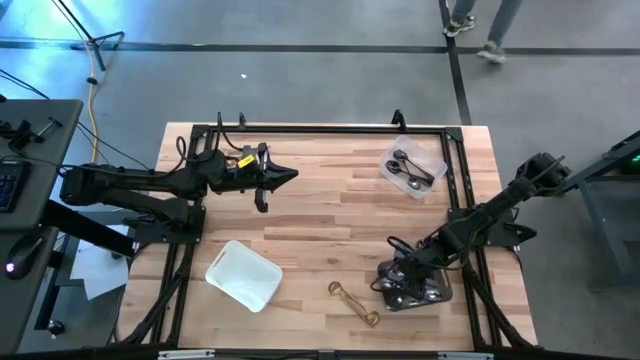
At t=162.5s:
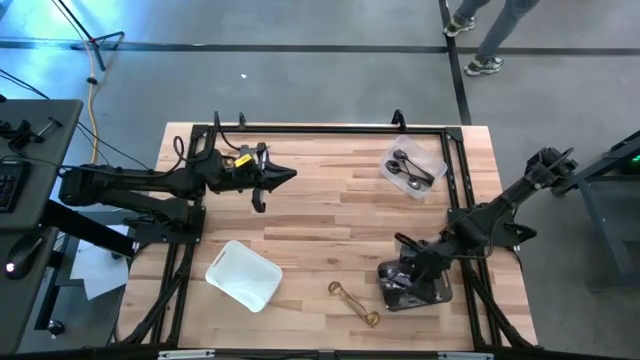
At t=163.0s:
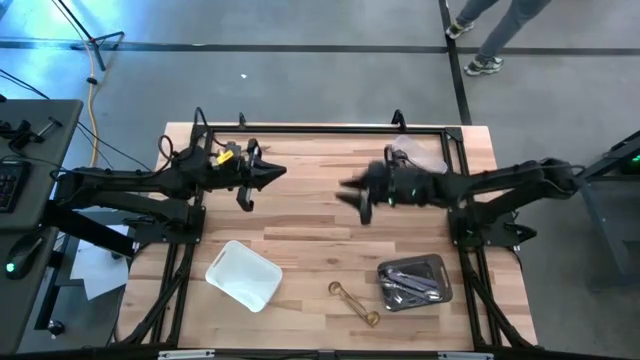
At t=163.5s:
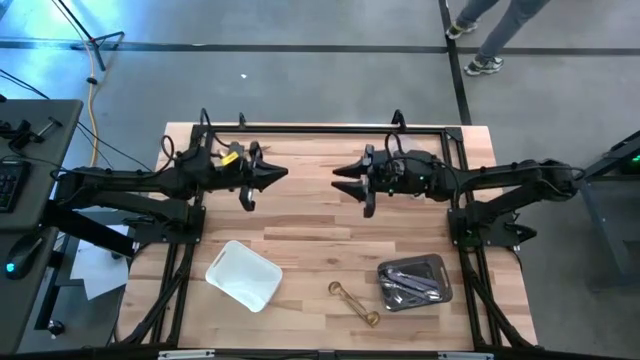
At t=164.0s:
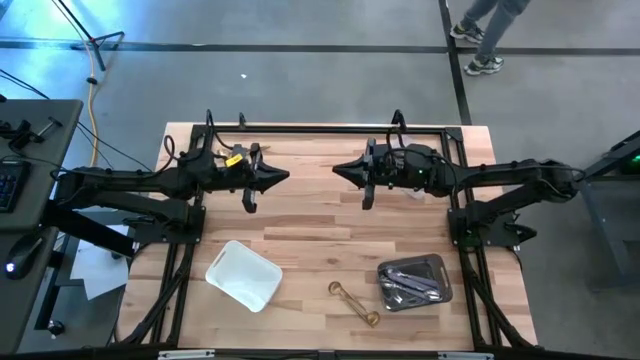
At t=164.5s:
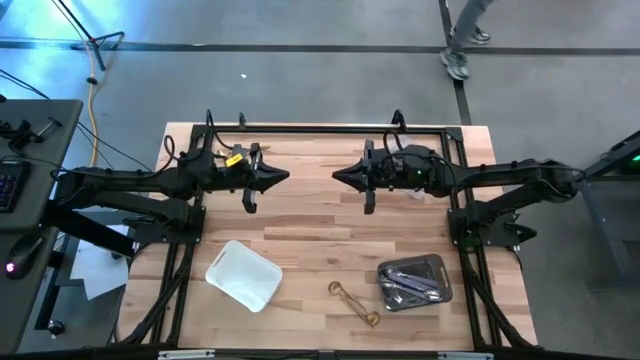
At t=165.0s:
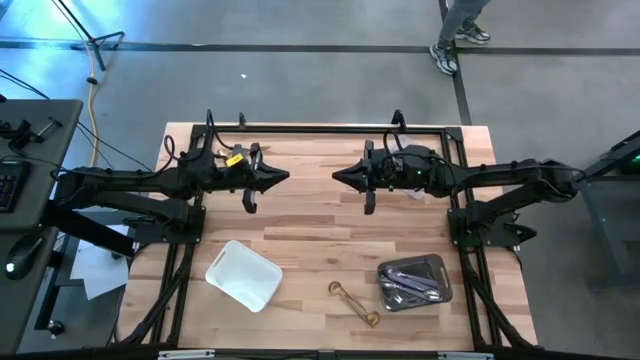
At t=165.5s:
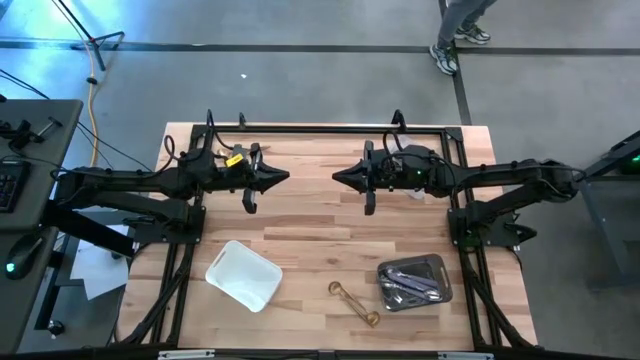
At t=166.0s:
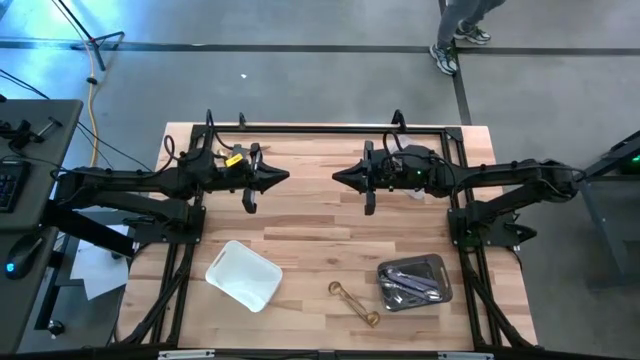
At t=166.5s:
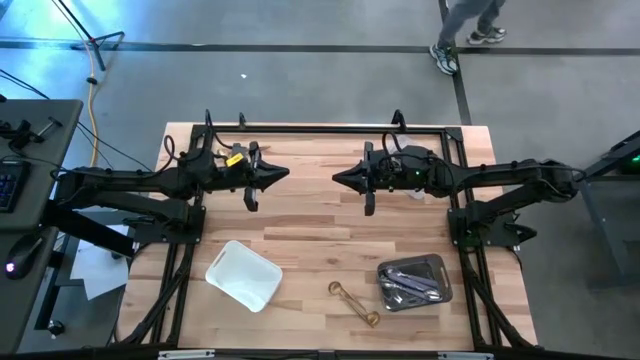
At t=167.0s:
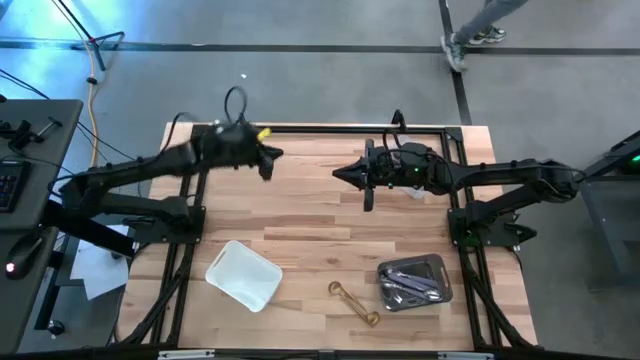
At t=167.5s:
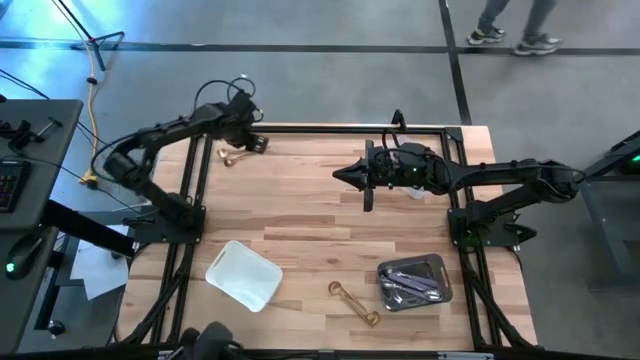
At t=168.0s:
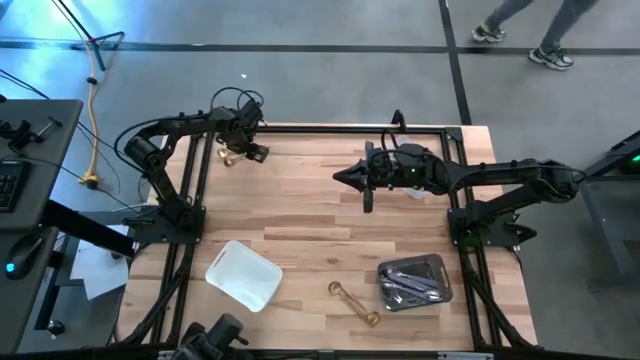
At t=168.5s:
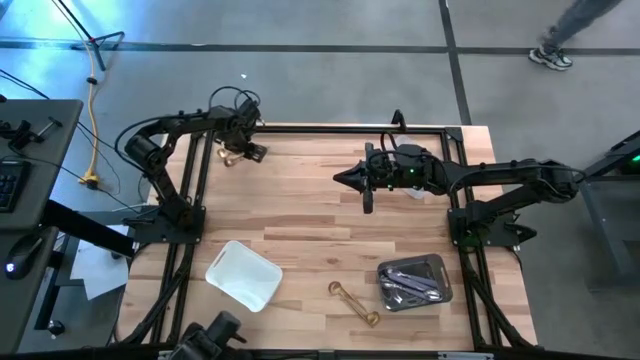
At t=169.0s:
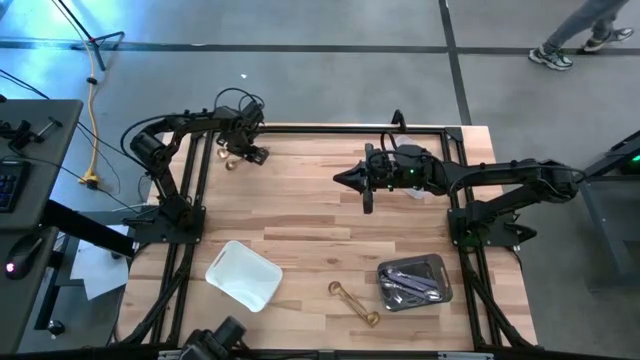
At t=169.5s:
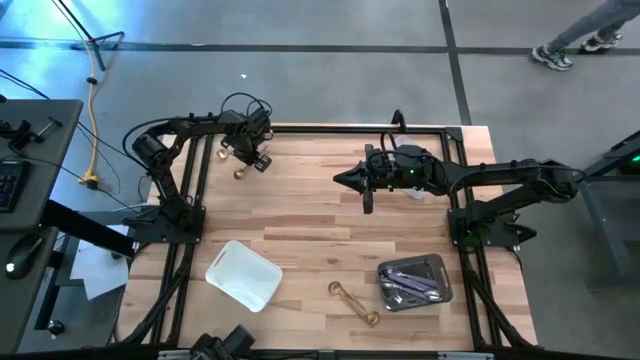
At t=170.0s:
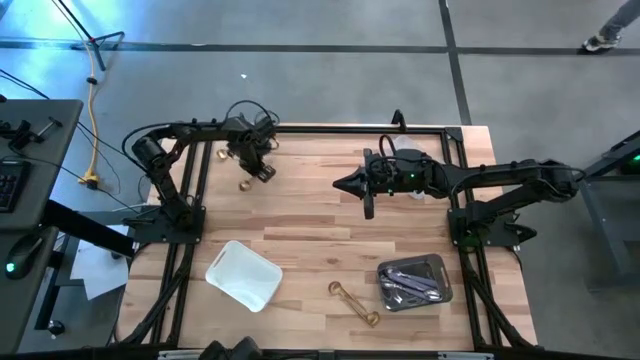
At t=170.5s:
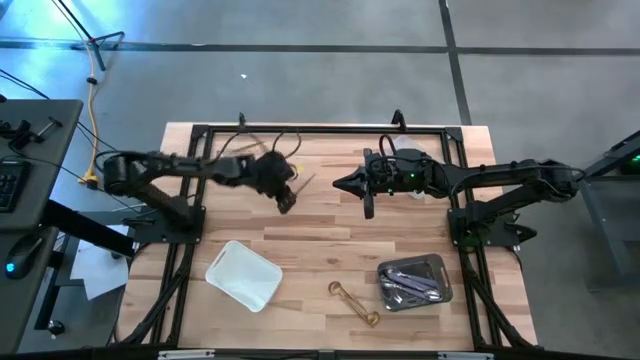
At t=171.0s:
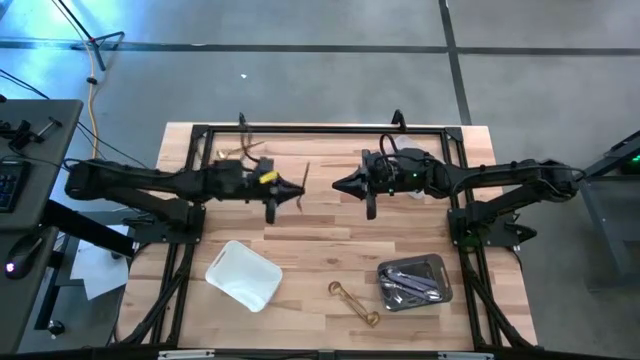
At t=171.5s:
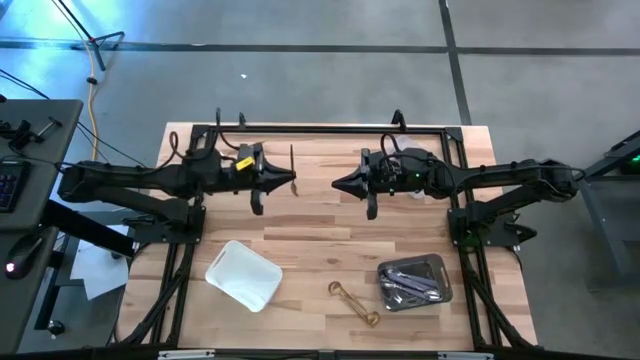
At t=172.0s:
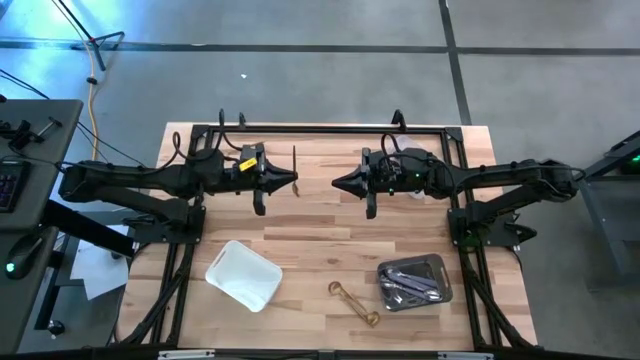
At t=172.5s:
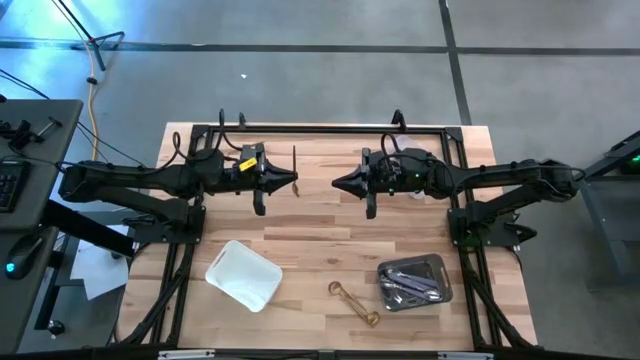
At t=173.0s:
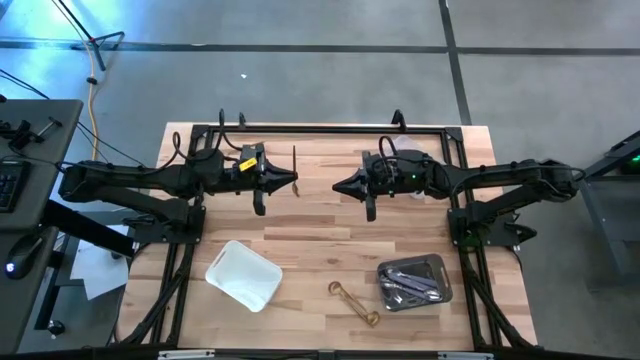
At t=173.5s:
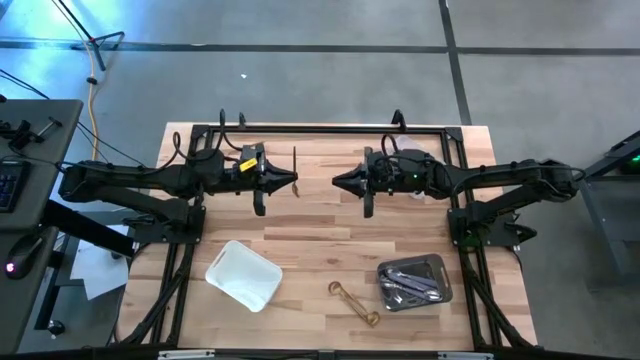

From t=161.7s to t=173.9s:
Task: Sort silverware by color (type)
Put the gold spoon into the white bin

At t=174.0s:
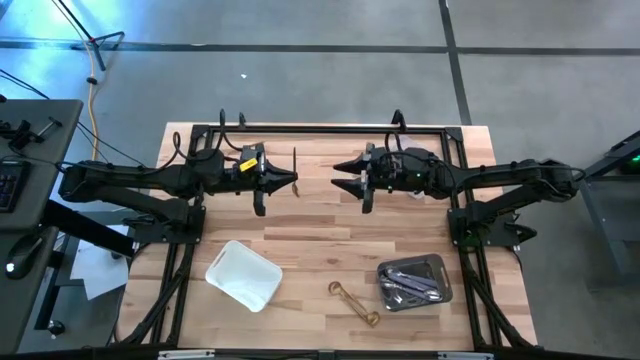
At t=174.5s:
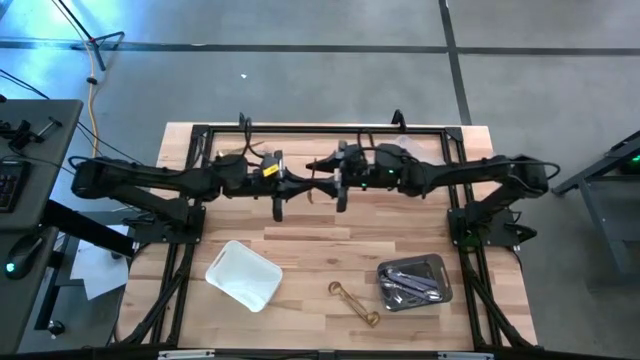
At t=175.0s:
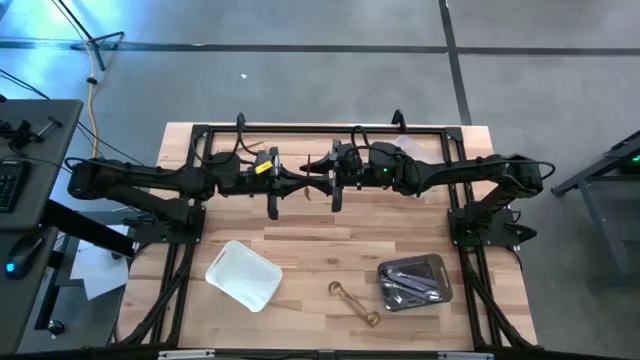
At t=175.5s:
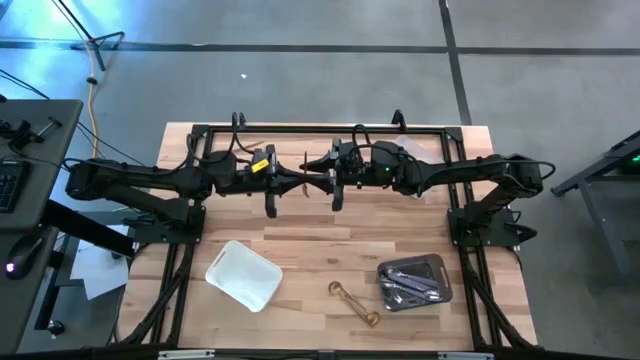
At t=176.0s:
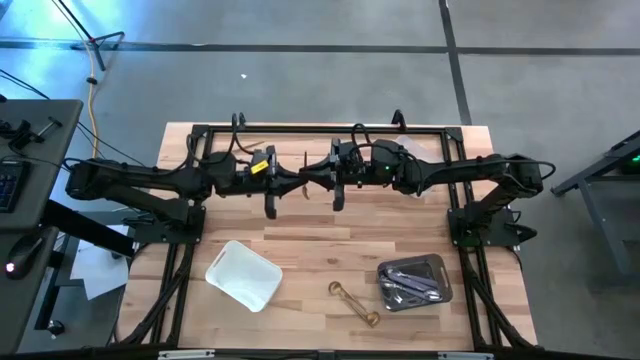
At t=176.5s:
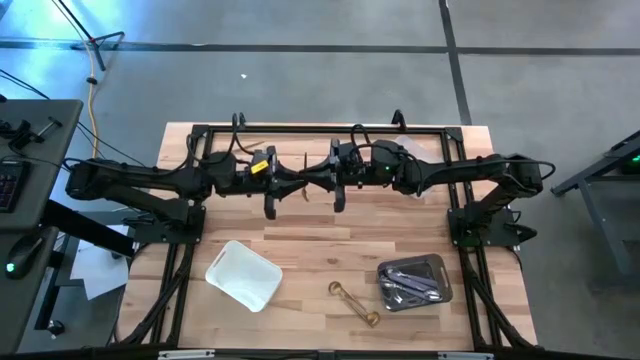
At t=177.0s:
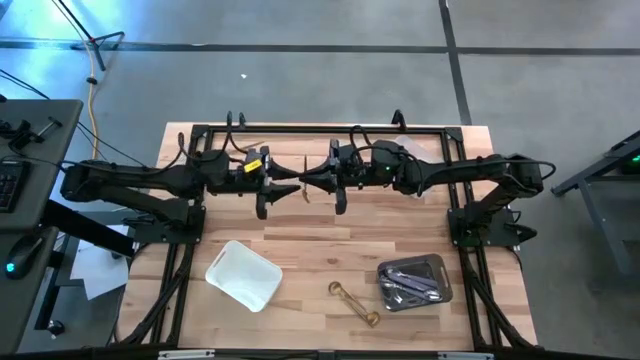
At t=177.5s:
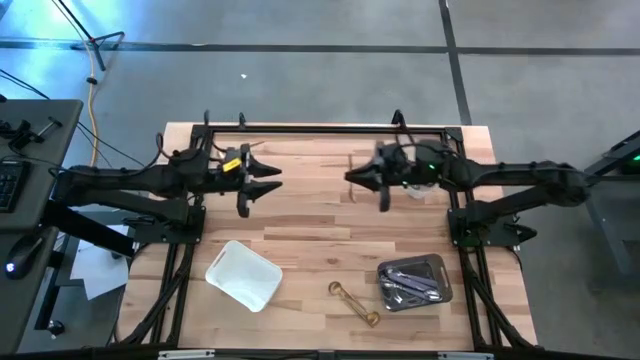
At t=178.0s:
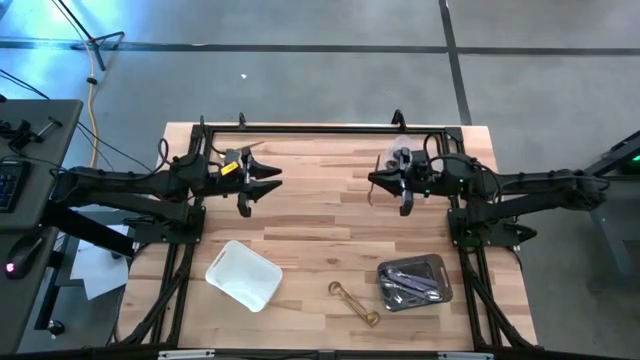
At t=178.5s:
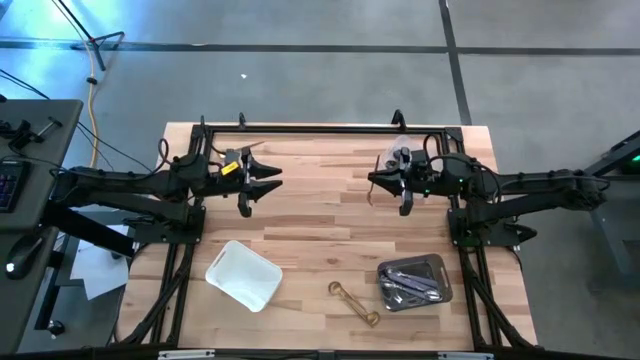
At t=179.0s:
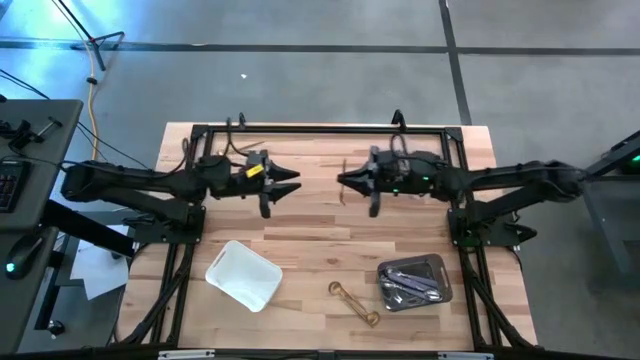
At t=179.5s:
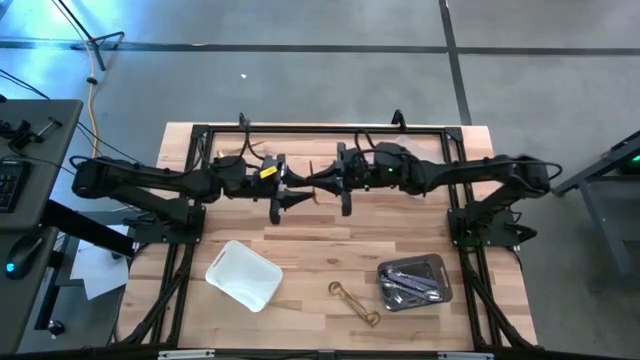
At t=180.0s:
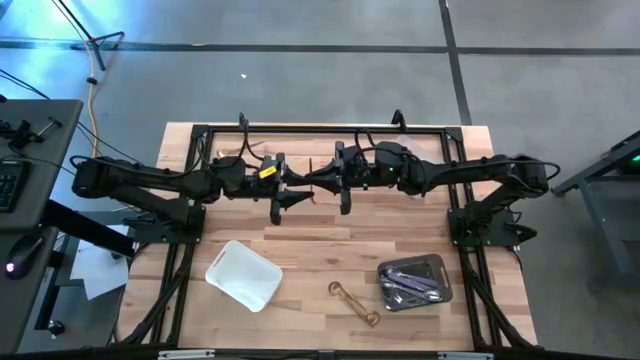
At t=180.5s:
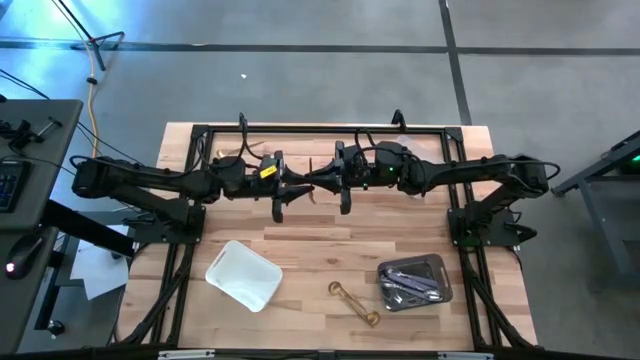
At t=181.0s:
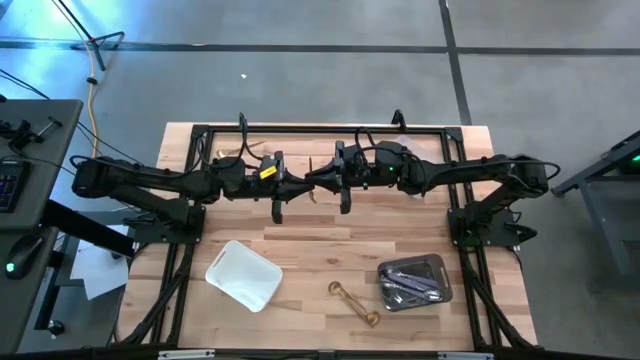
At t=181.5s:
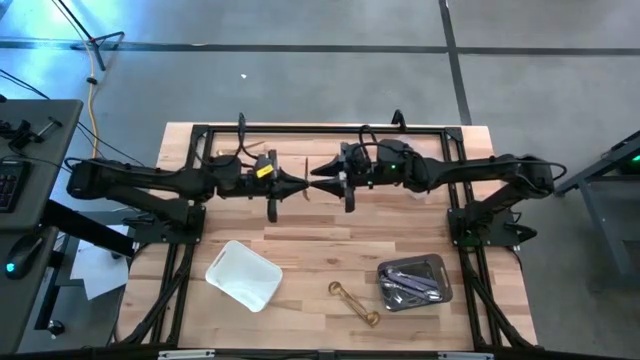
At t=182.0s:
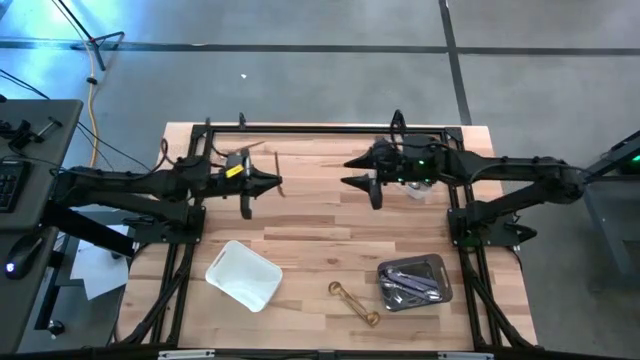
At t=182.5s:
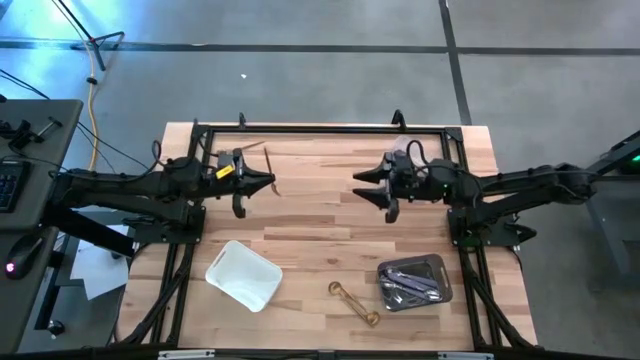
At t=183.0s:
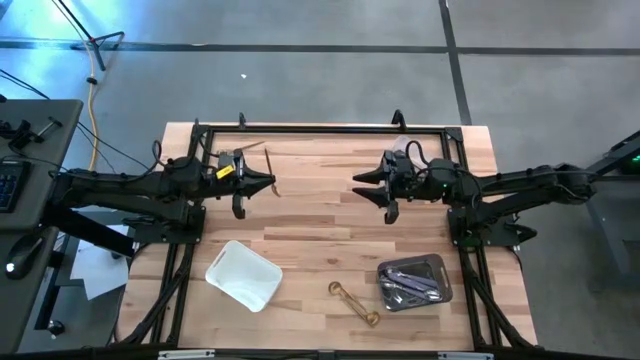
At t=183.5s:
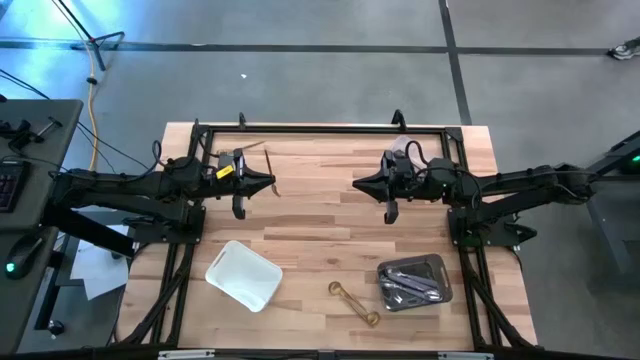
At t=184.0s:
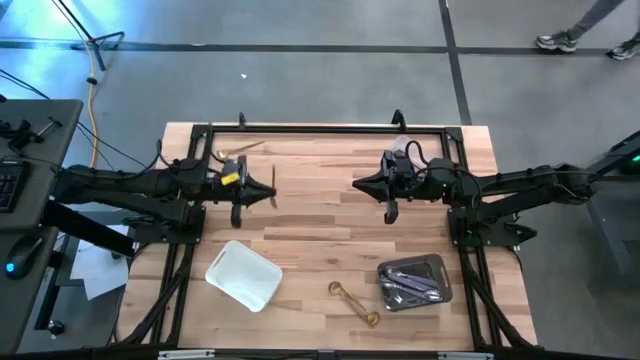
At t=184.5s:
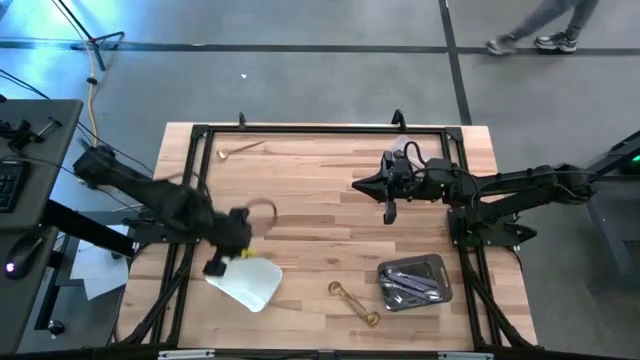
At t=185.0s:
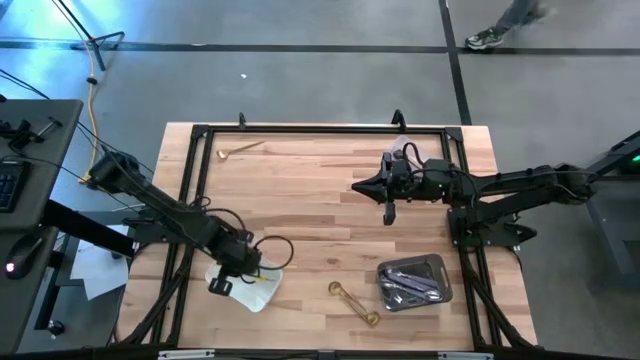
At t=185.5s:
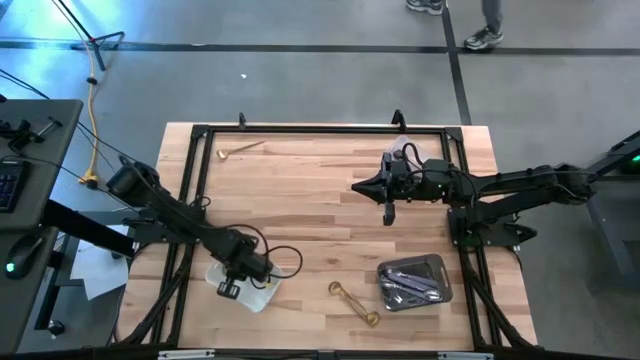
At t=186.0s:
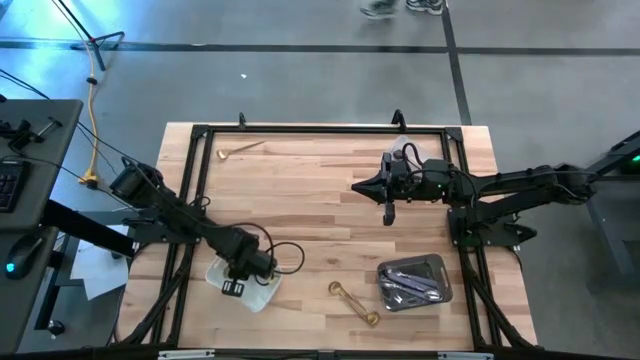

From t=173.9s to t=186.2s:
Put the gold spoon into the white bin
